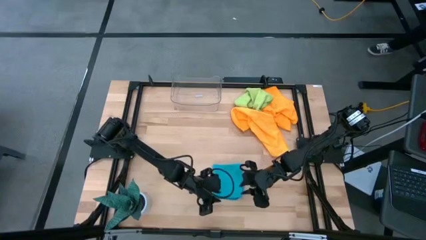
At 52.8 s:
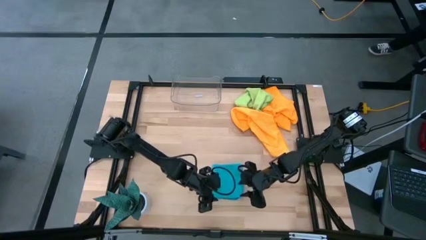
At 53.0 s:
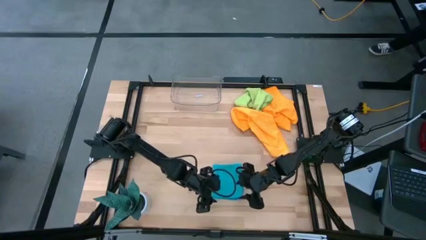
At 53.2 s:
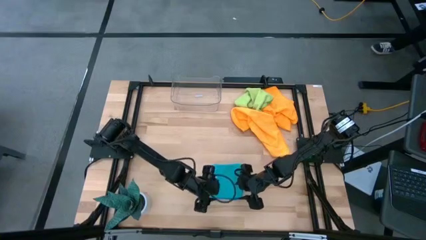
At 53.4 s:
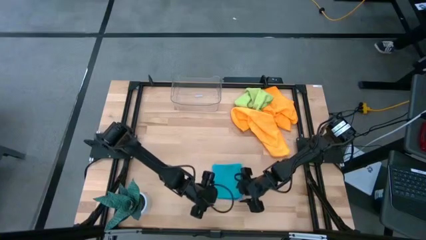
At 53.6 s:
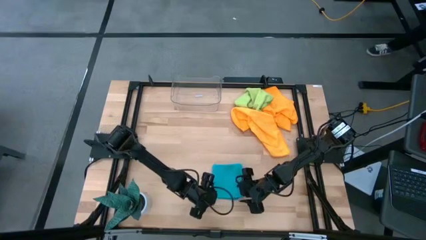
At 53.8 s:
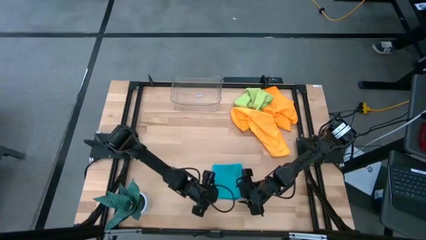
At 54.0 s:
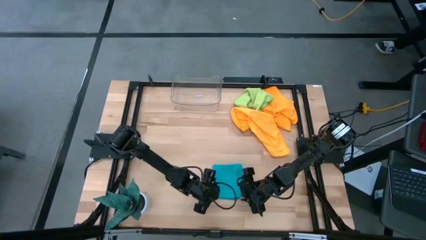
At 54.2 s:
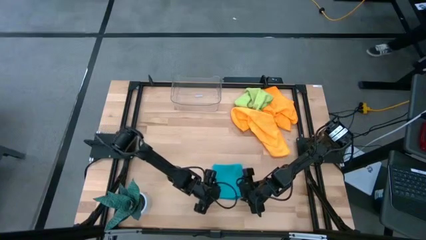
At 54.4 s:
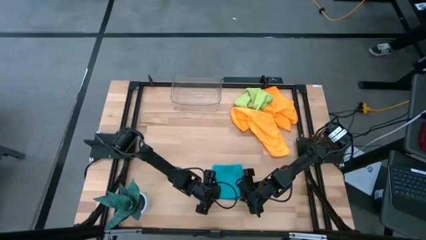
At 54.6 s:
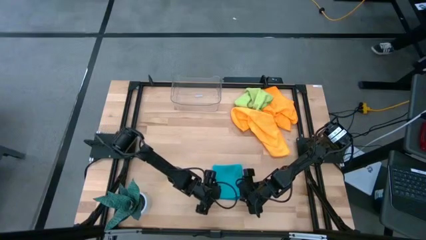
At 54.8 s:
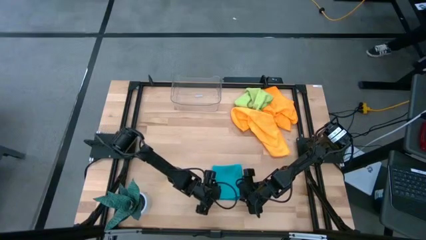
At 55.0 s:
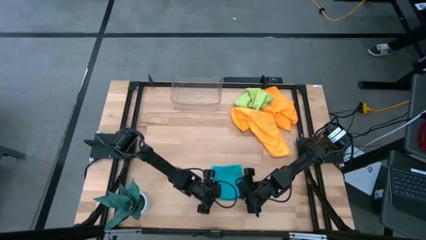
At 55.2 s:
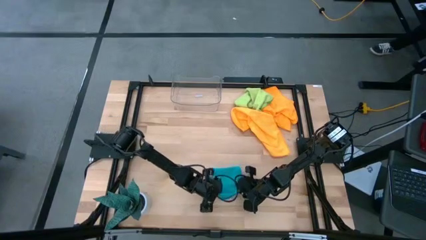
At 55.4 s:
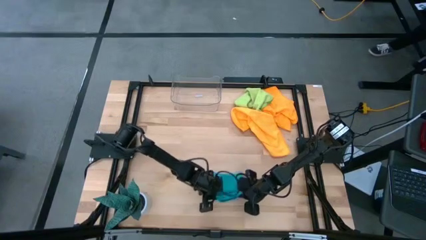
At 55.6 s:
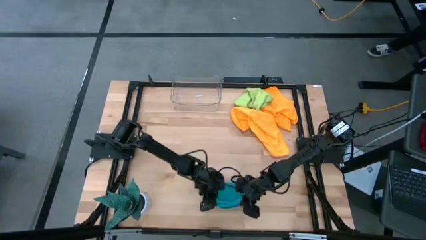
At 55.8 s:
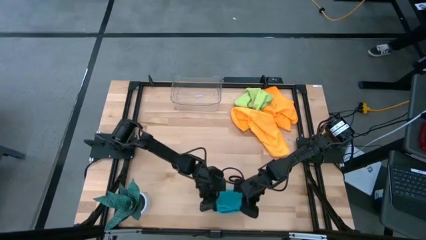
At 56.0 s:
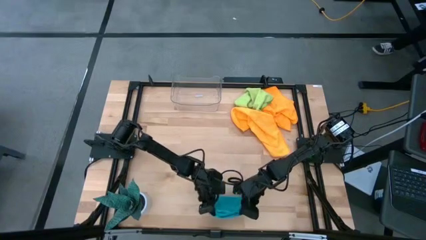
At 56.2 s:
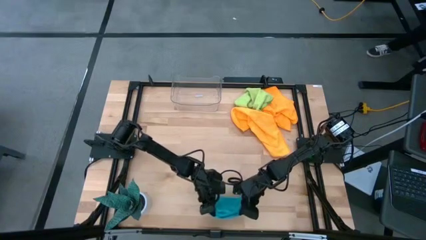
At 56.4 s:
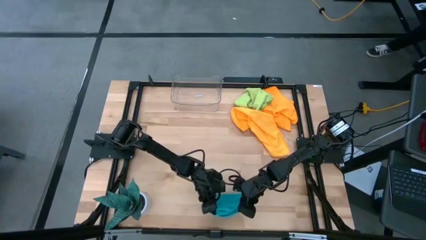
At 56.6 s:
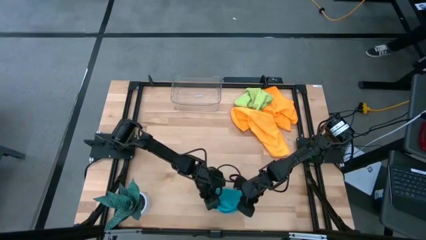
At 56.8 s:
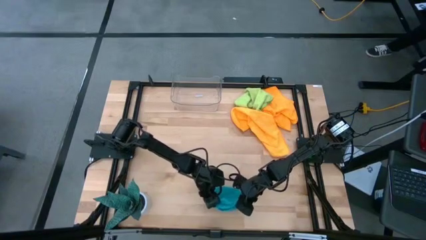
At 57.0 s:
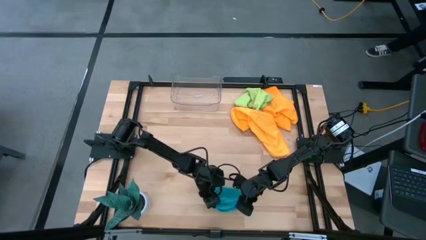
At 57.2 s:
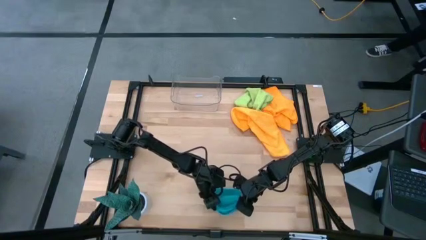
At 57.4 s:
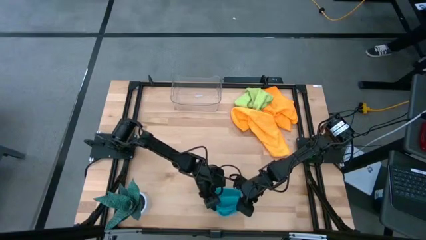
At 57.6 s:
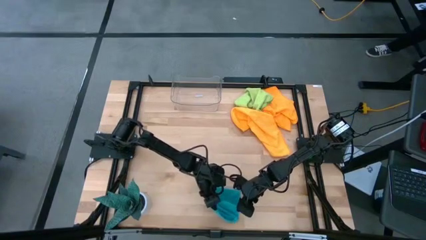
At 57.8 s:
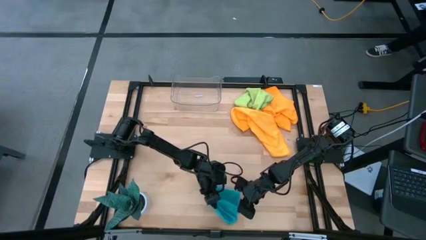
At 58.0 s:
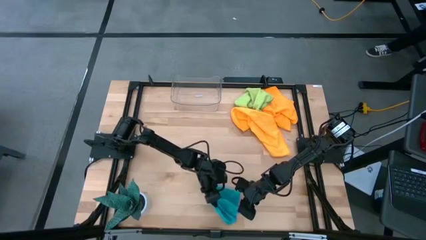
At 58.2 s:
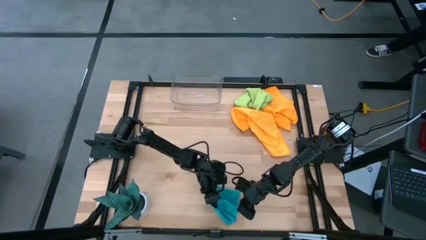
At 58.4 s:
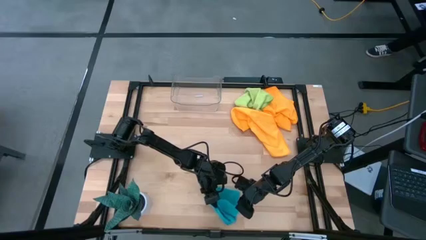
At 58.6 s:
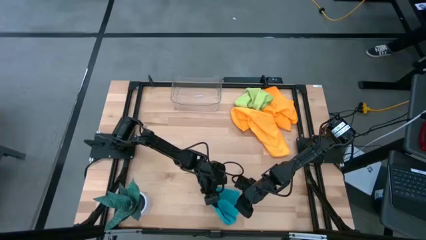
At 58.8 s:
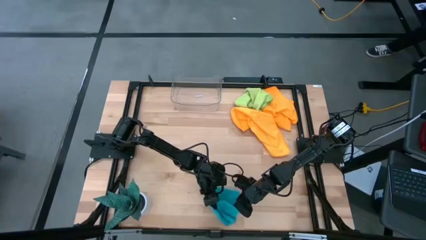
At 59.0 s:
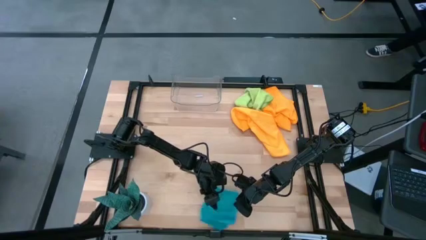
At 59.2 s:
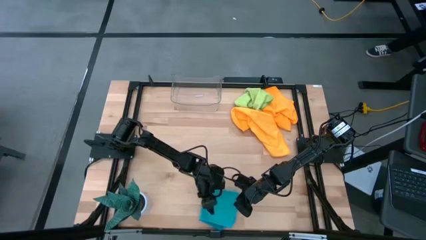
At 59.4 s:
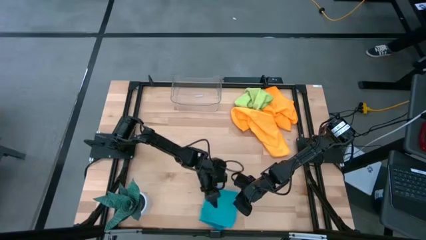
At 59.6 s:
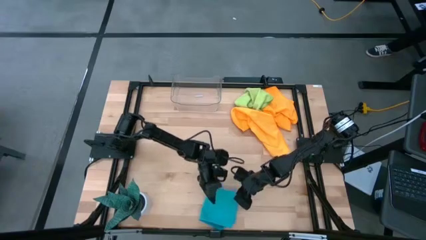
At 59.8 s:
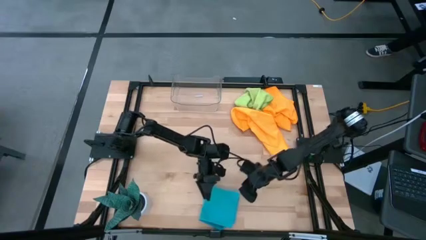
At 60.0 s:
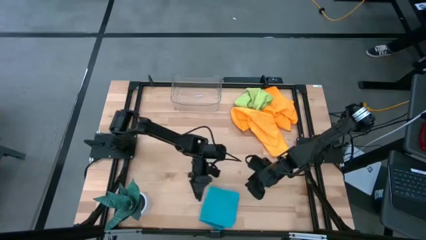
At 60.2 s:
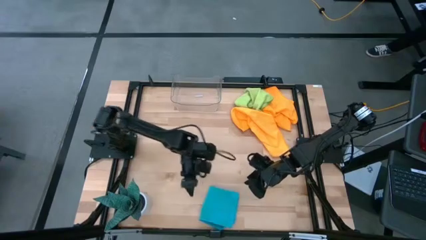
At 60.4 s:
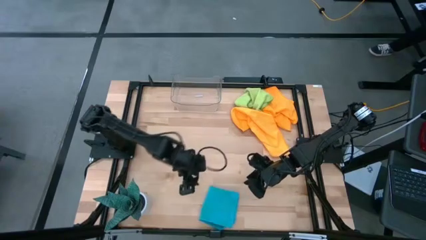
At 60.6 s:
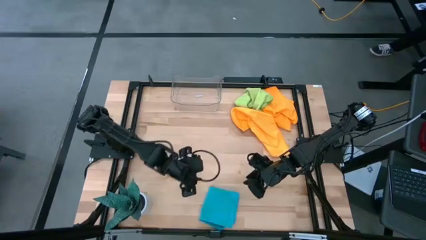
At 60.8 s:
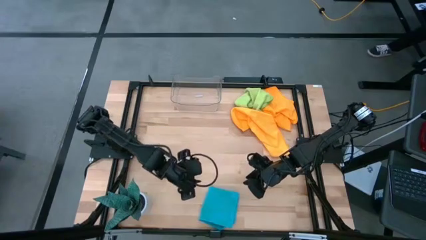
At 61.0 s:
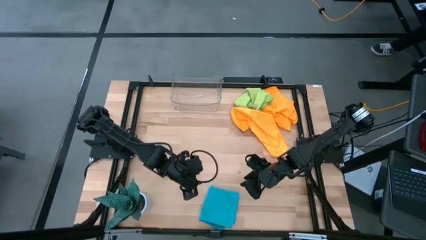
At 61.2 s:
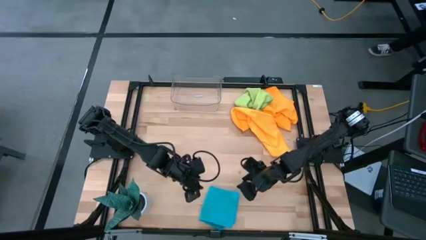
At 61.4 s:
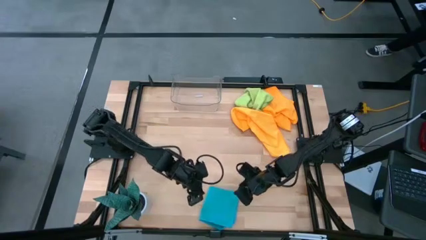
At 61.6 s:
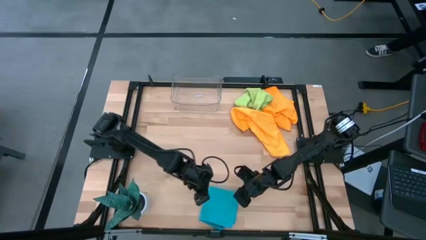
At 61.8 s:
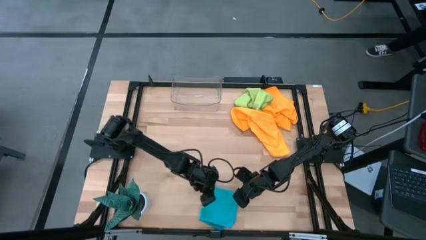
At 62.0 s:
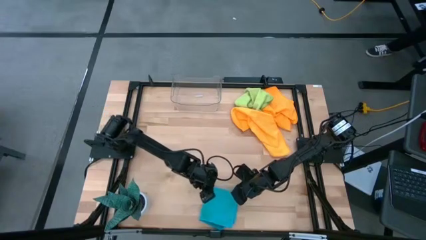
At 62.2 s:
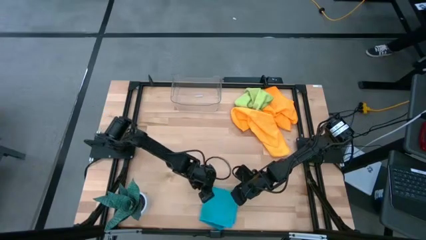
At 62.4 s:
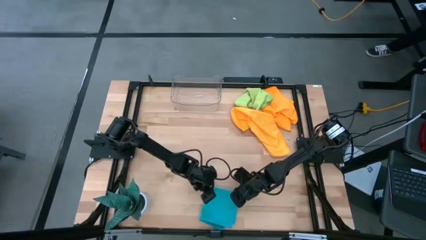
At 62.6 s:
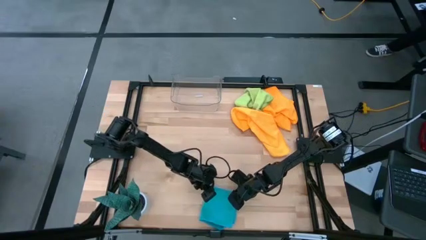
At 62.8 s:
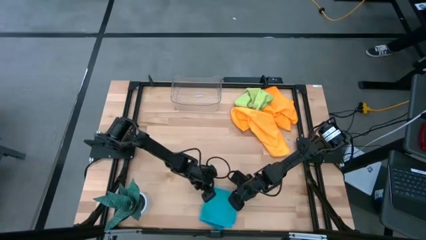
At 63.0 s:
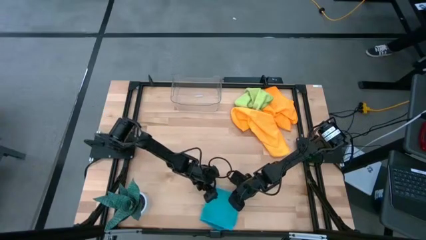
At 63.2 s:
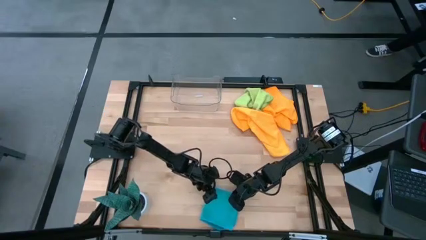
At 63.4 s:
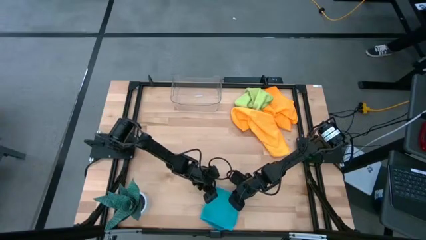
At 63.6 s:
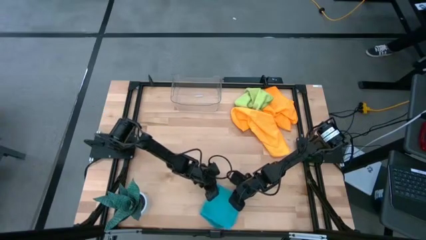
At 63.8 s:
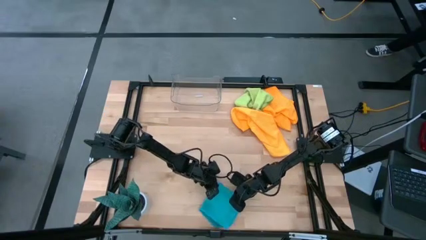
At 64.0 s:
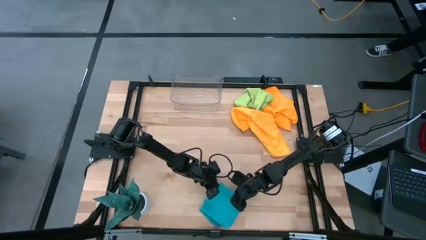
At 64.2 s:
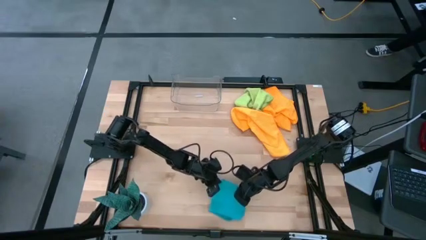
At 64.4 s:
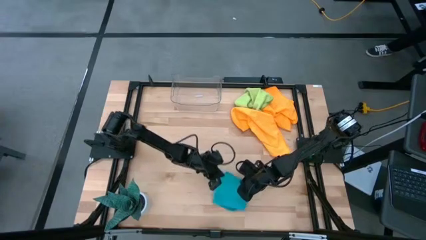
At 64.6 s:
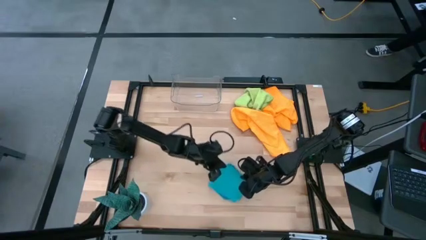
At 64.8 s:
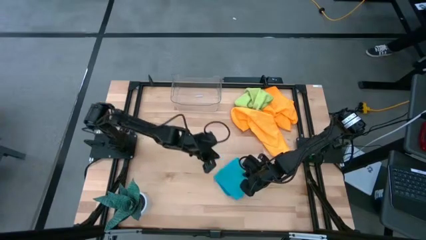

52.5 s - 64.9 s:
Task: Fold microfiber towels
Fold the blue microfiber cloth

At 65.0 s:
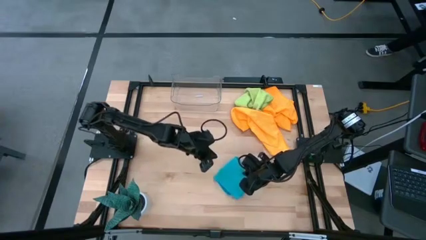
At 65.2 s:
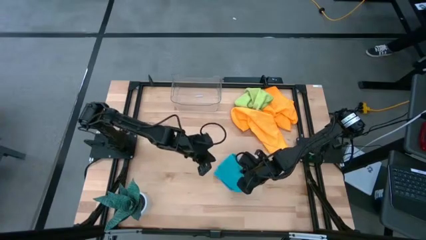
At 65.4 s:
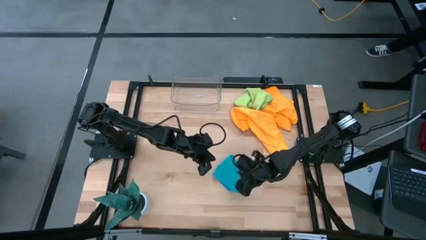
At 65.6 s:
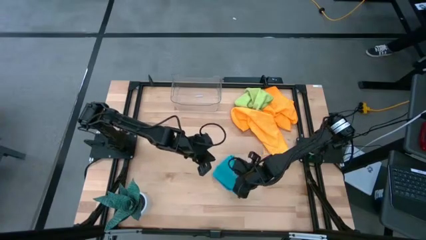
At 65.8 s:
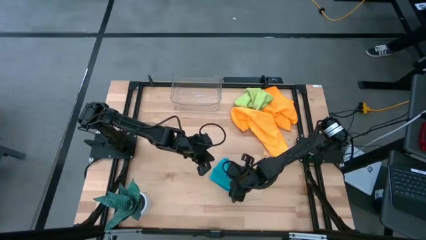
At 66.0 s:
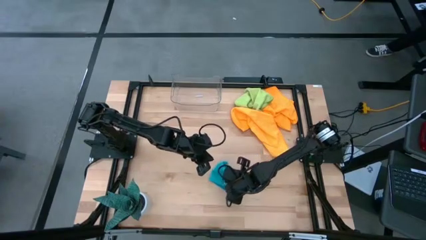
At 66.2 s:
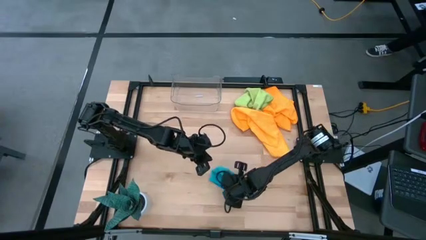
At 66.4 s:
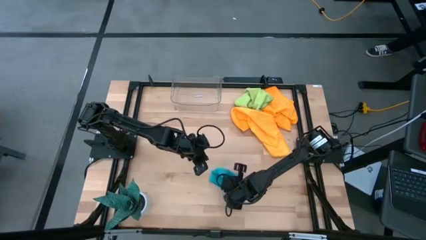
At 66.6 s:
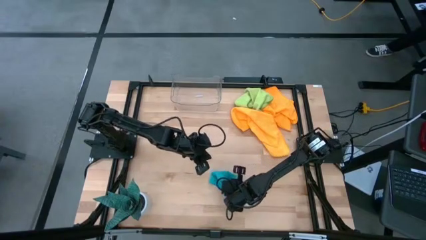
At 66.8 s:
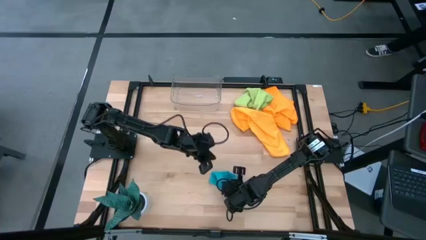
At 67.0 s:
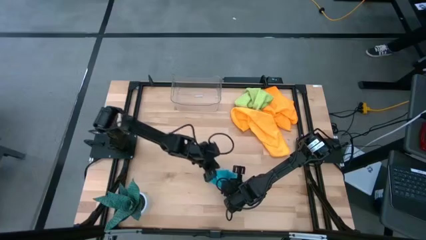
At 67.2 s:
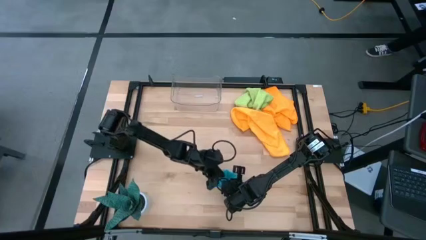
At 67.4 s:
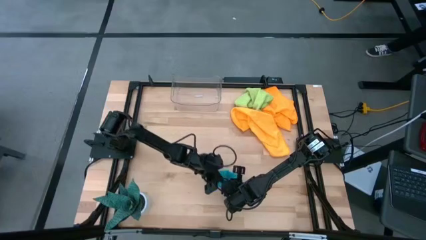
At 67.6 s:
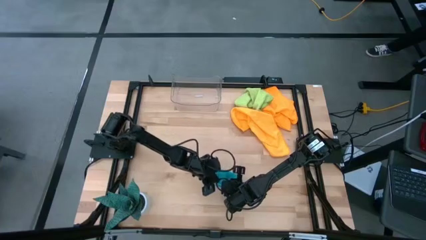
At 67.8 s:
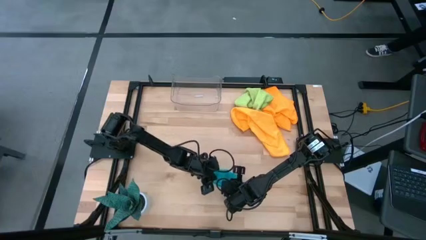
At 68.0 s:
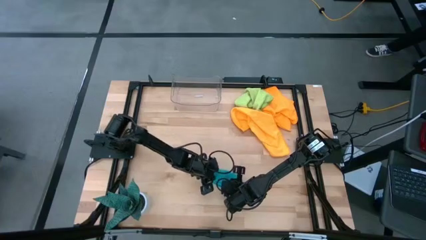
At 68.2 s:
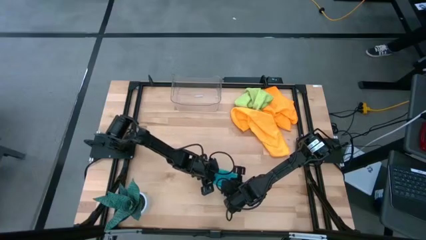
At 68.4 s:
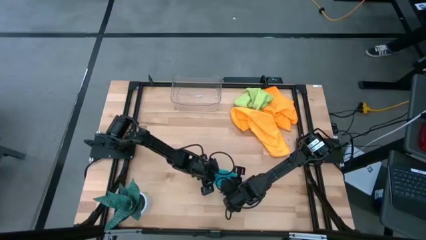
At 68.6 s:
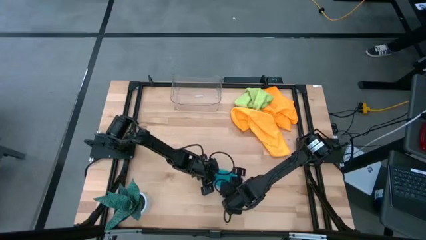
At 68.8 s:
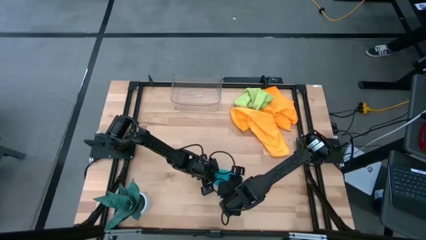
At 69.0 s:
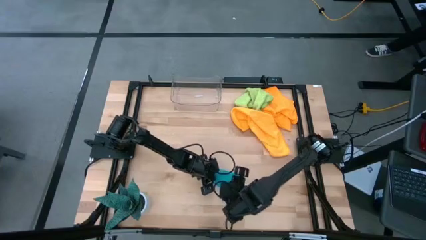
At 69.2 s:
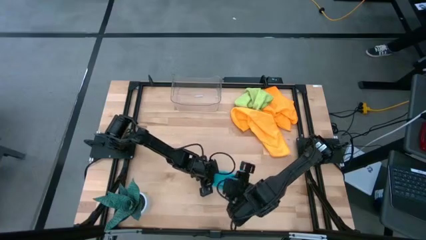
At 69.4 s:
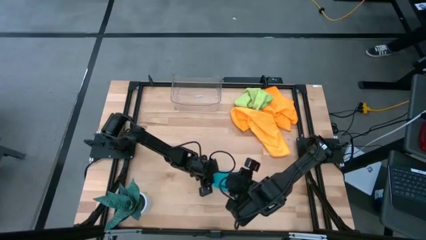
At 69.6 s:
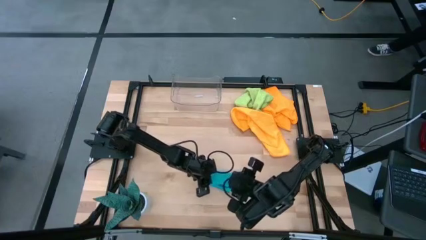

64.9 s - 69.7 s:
Fold the blue microfiber cloth

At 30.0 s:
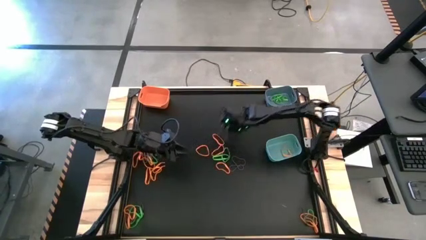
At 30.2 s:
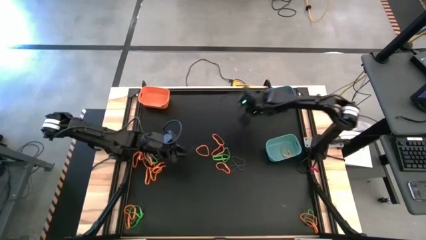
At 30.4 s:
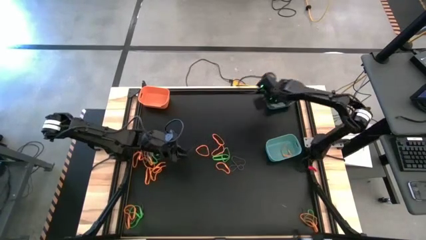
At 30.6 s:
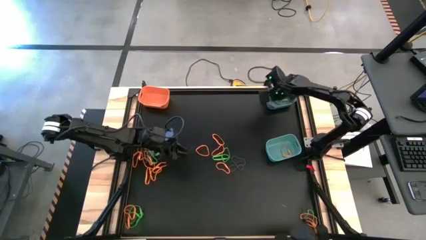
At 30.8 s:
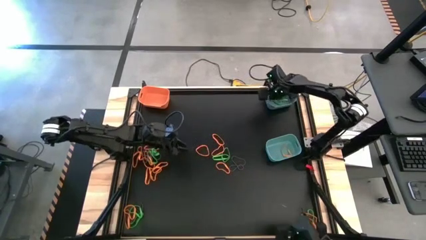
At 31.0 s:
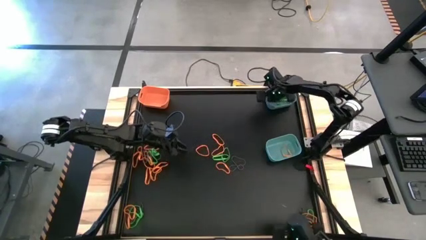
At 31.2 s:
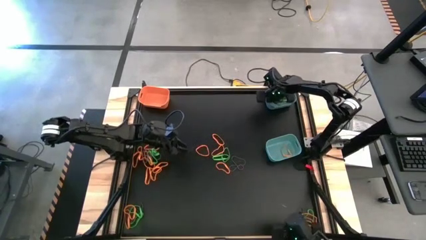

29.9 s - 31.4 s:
Task: Sort rubber bands into baskets
Put the green rubber band into the blue bin
